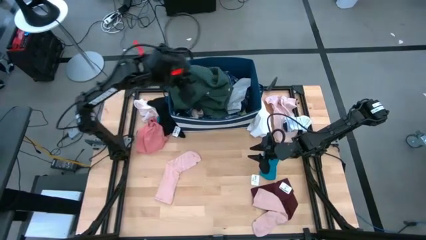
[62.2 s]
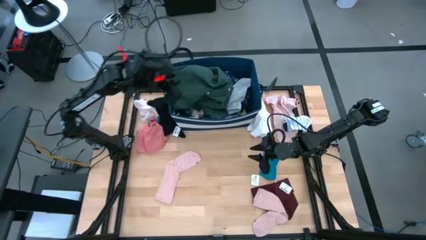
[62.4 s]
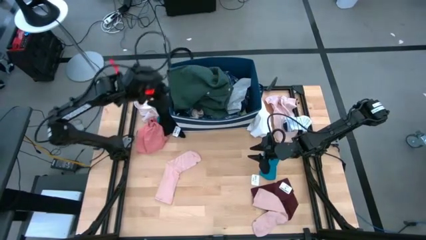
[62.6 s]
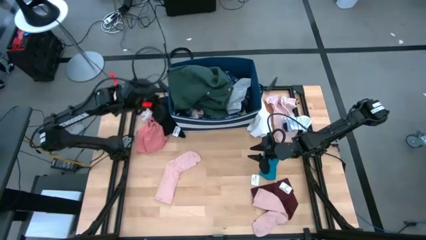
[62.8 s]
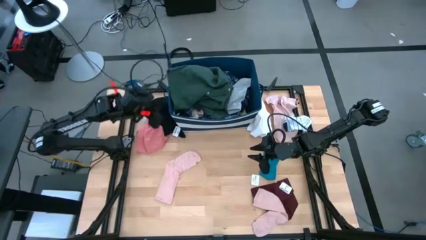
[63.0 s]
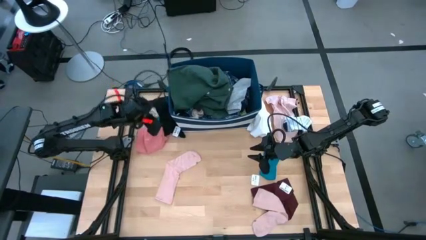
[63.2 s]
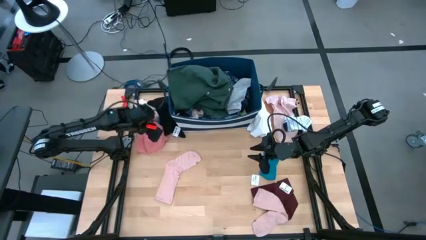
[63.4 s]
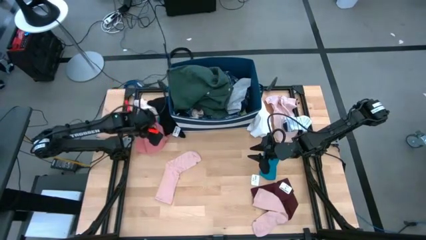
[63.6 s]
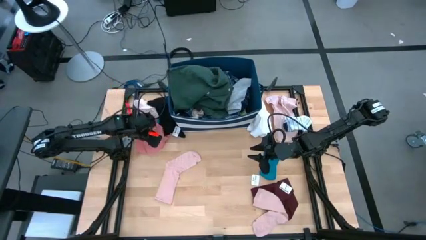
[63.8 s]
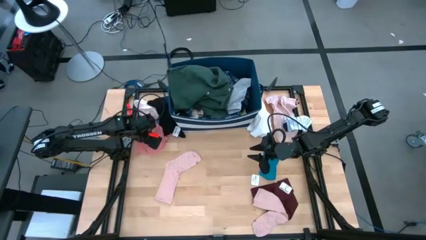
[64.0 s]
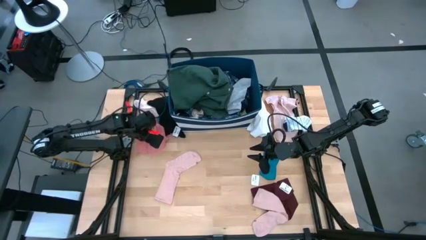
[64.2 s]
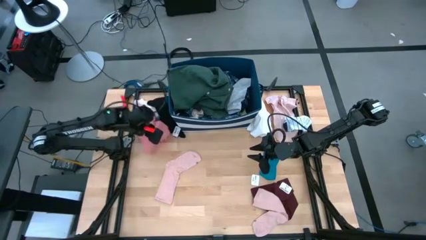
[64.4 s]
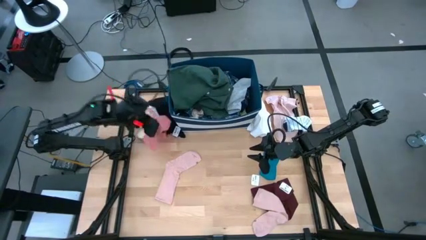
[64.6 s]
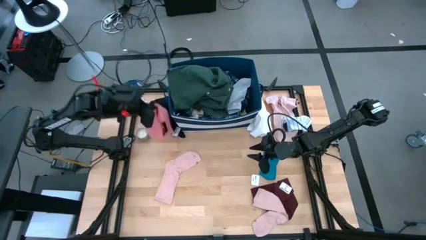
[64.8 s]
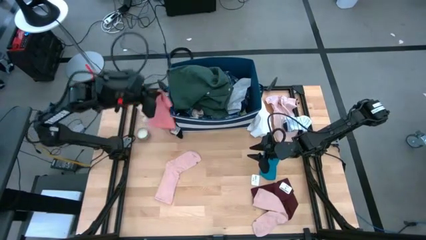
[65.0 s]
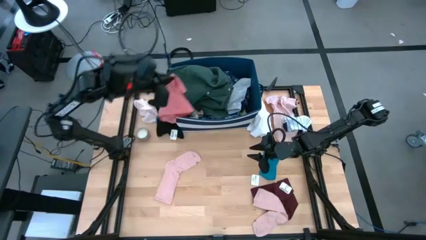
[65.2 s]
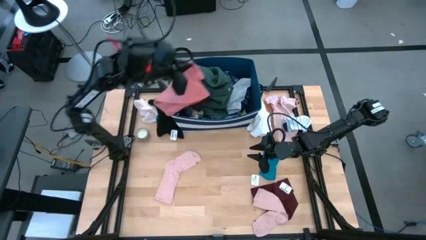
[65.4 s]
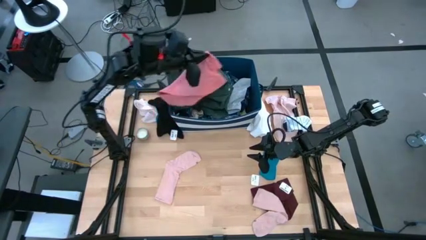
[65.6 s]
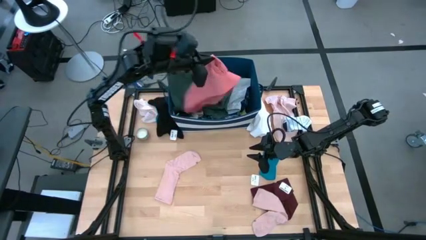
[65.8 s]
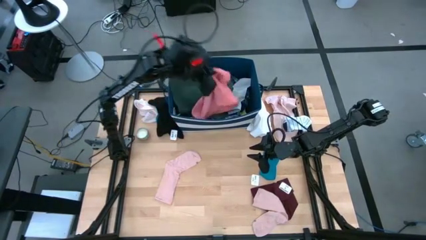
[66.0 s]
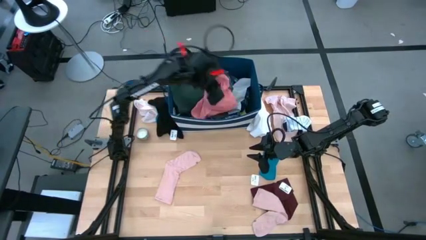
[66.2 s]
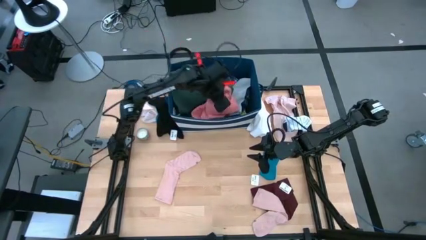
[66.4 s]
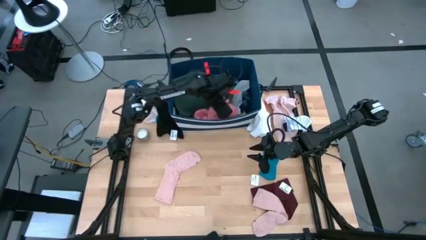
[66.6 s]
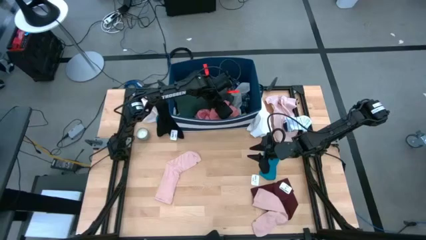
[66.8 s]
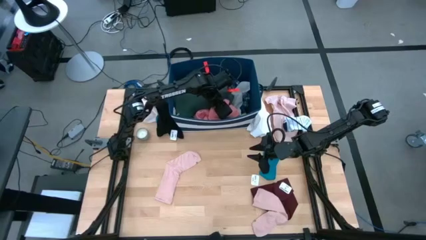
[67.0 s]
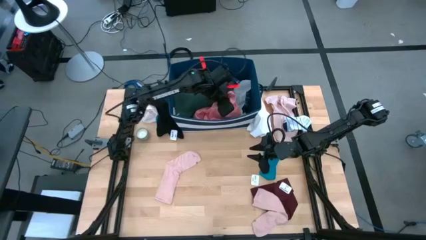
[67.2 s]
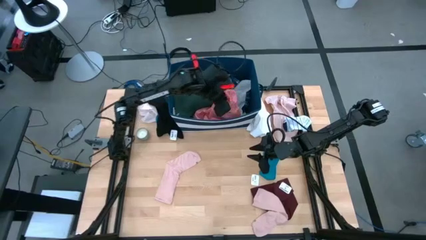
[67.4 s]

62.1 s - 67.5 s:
Task: Sort clothes
Put the pink underwear into the blue laundry bin

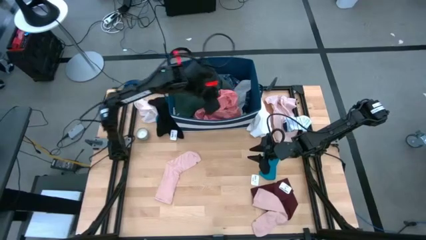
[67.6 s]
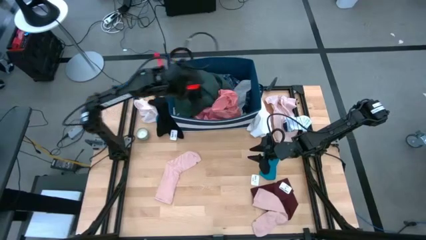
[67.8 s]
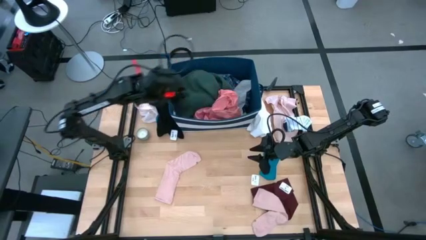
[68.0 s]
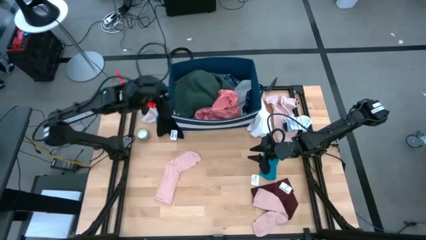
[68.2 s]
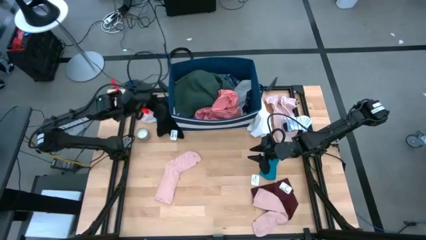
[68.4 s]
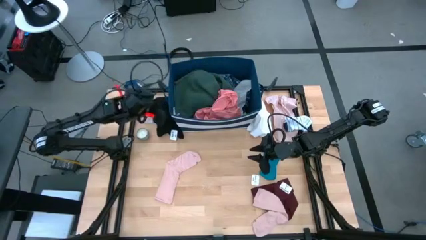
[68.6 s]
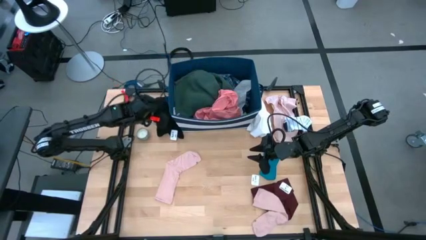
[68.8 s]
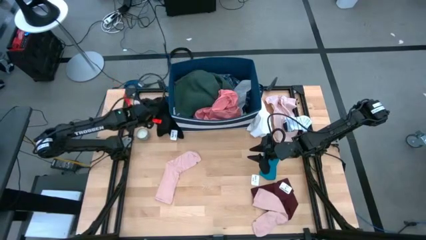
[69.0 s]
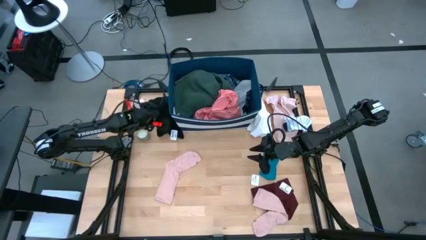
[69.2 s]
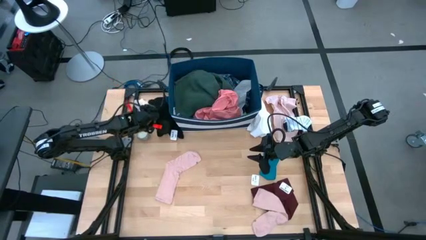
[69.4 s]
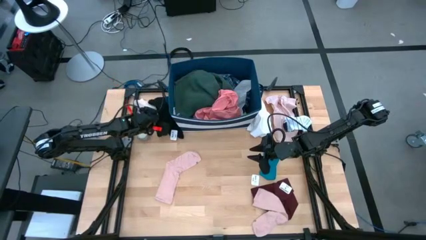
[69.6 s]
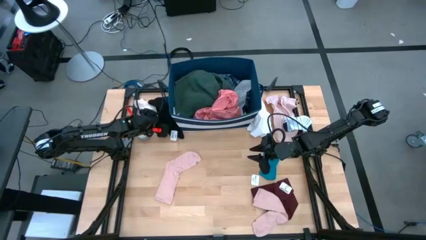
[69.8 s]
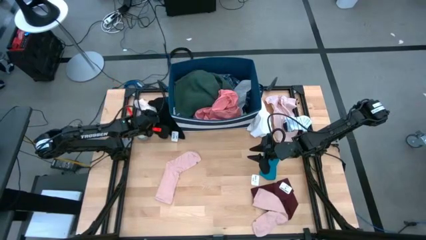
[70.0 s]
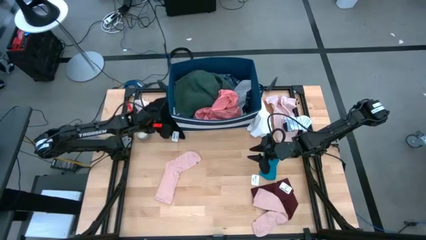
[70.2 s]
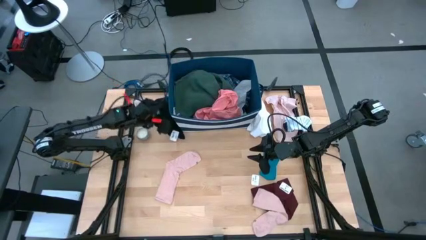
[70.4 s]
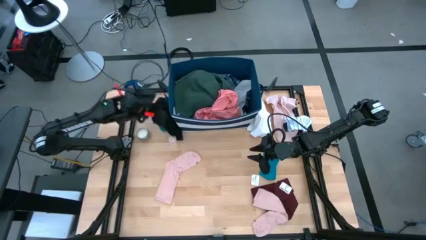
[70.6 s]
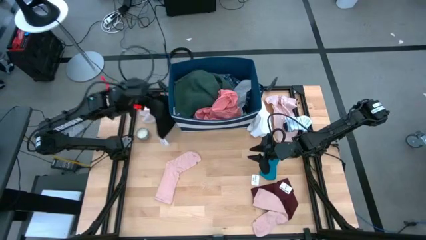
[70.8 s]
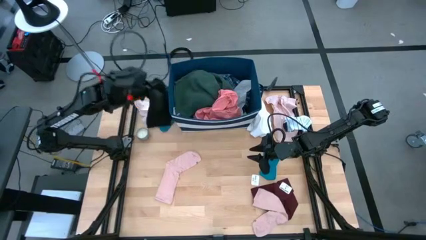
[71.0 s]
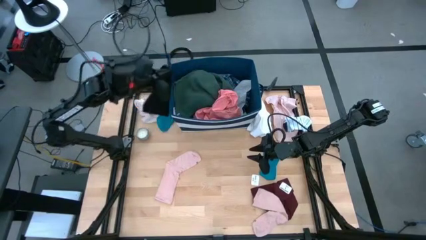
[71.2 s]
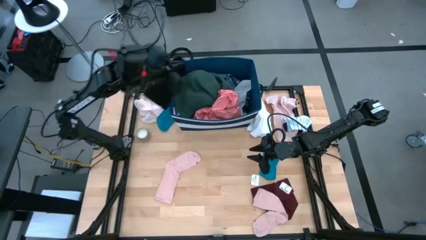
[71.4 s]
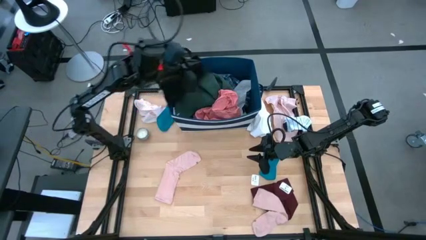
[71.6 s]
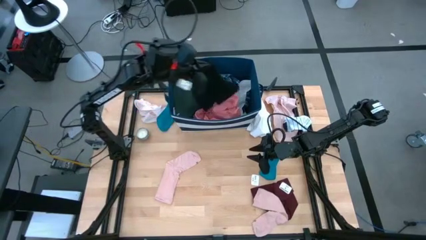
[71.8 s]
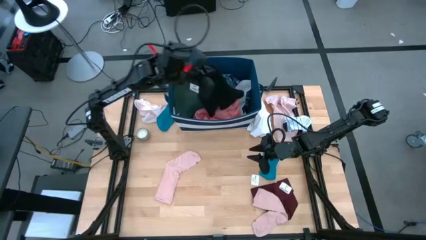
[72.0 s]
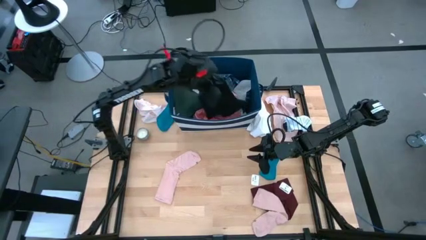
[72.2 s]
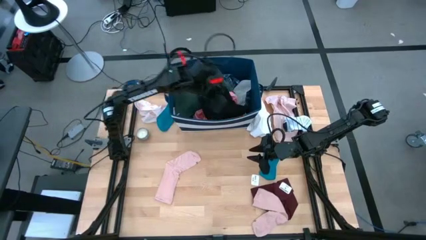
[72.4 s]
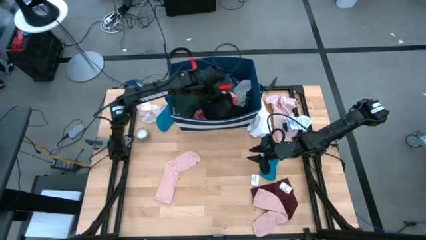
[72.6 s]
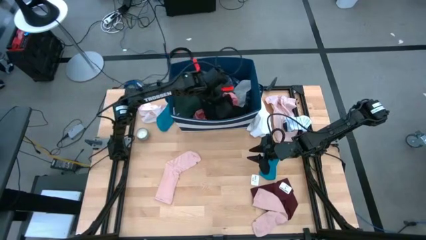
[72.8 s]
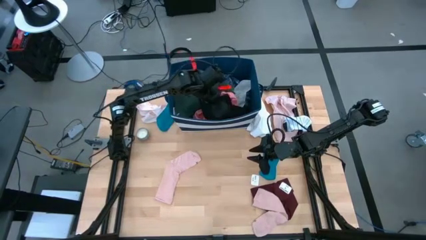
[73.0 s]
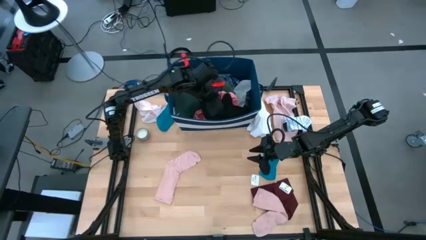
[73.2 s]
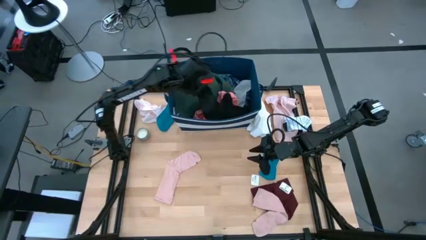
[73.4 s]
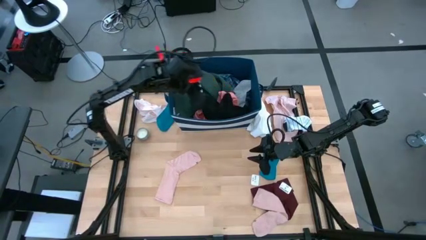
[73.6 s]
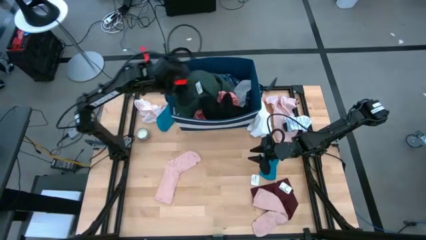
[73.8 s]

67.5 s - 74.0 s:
Put the black underwear into the blue laundry bin

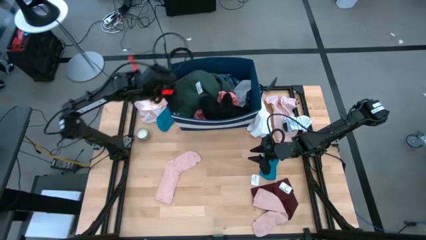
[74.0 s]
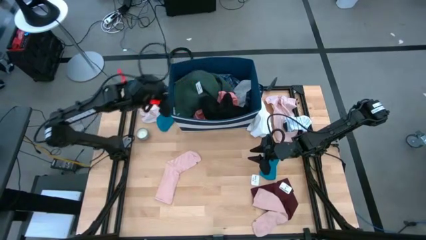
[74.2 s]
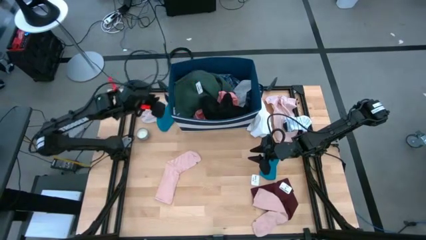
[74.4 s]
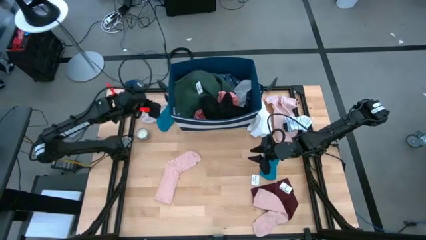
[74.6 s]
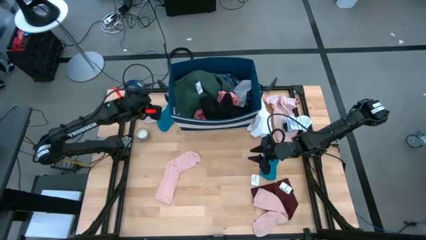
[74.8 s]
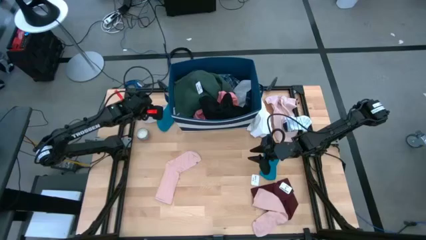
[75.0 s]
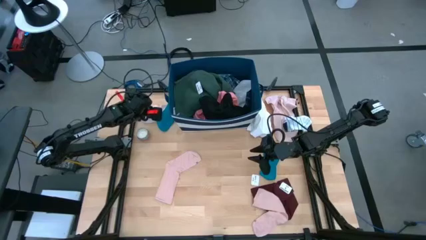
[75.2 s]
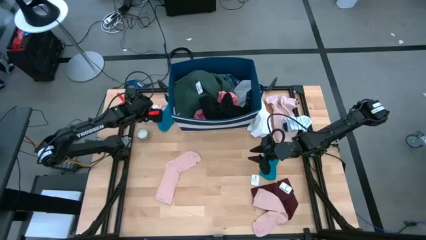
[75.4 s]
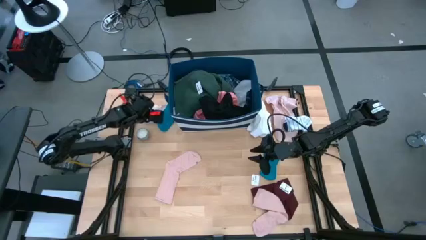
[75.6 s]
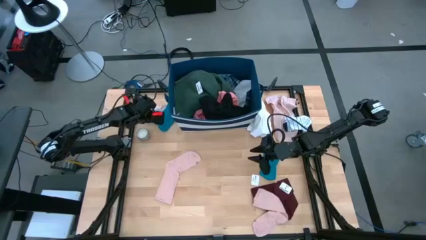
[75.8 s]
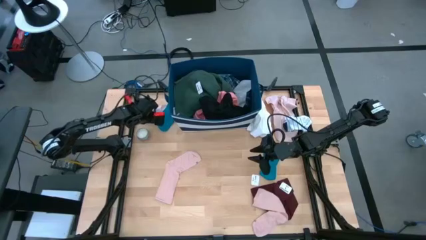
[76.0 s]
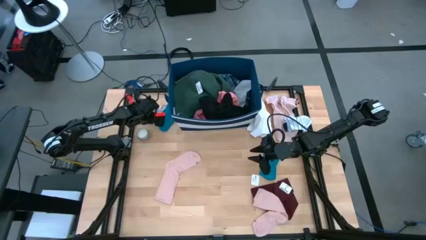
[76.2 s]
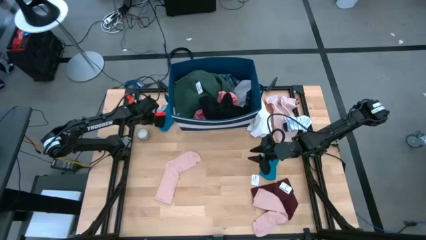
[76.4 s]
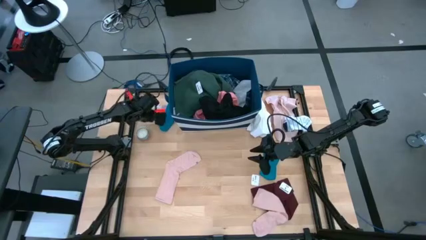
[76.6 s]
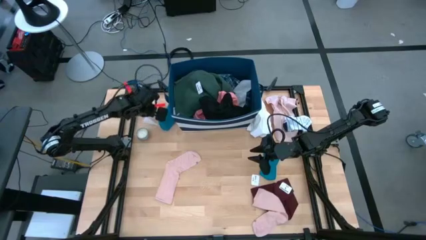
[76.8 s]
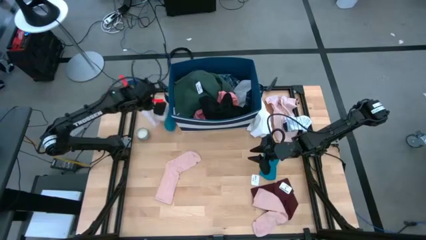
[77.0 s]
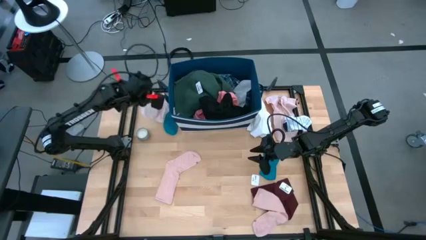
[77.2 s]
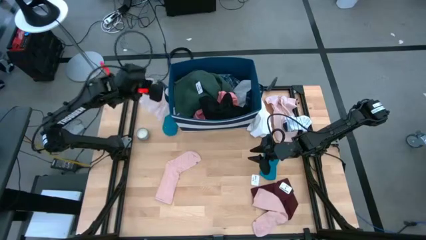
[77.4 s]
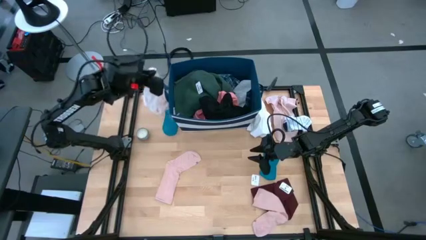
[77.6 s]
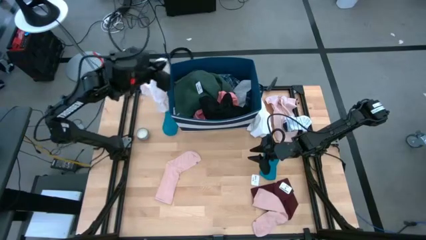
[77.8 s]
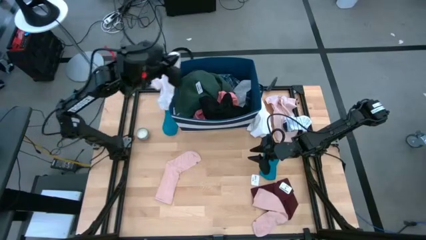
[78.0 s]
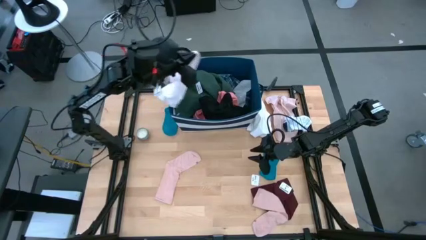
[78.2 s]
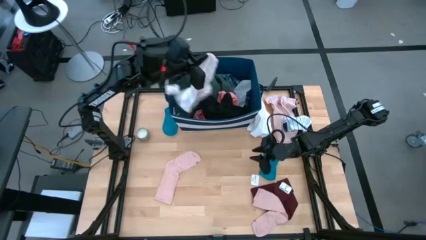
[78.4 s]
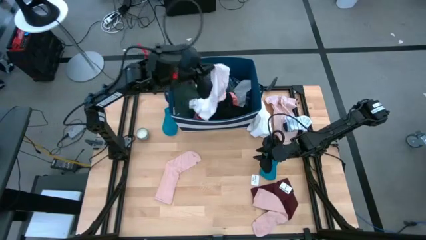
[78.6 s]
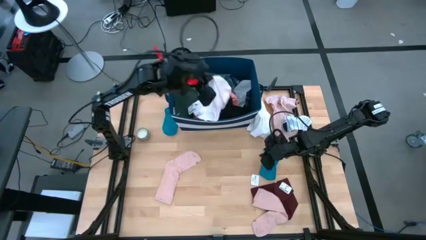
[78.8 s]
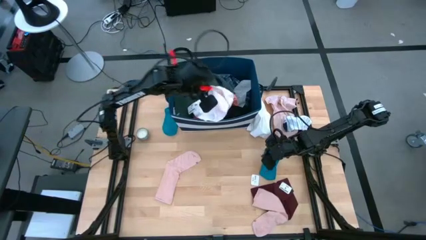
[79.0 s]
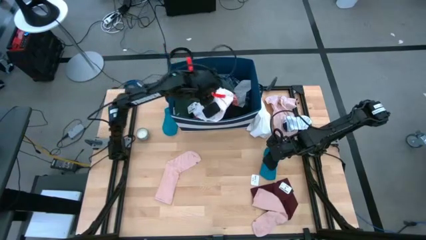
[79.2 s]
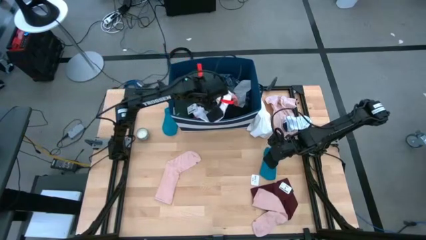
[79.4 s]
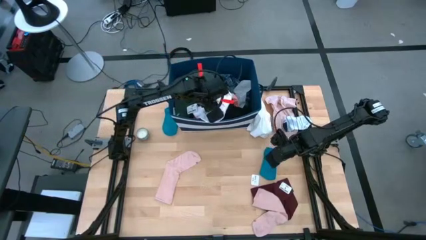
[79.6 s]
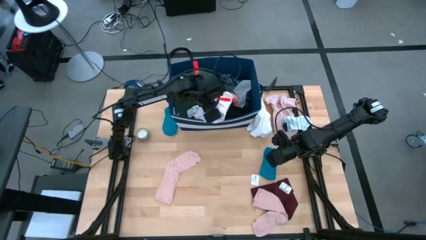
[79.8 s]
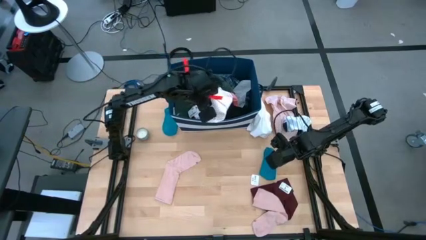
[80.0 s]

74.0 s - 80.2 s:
Put the light pink underwear into the blue laundry bin
